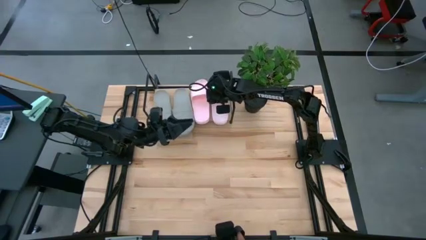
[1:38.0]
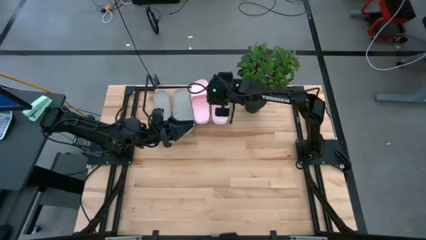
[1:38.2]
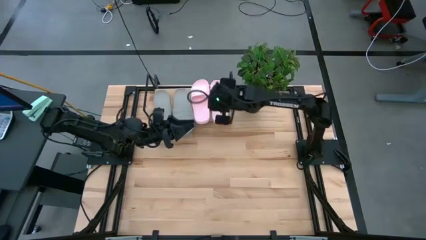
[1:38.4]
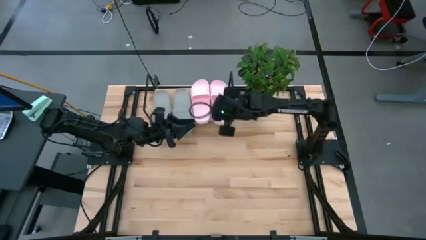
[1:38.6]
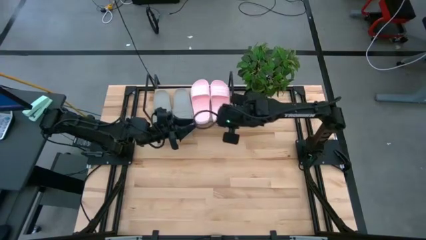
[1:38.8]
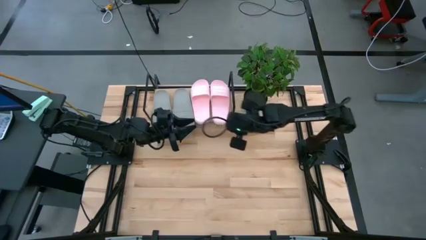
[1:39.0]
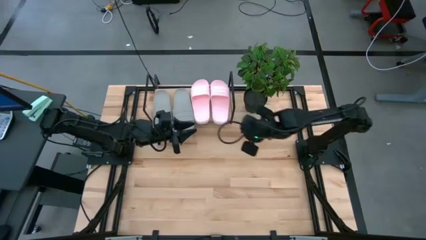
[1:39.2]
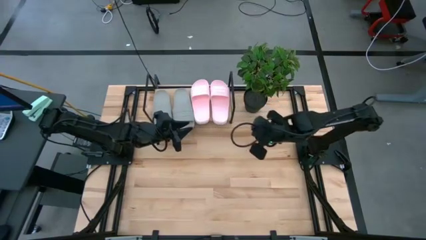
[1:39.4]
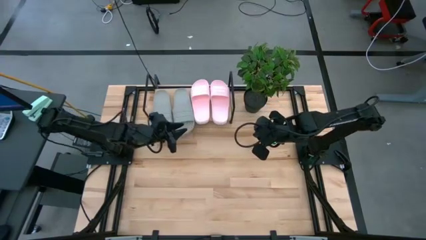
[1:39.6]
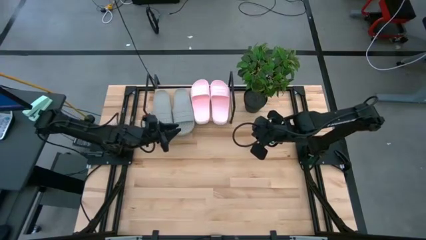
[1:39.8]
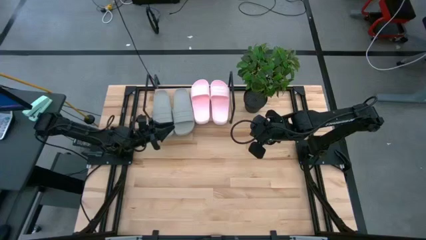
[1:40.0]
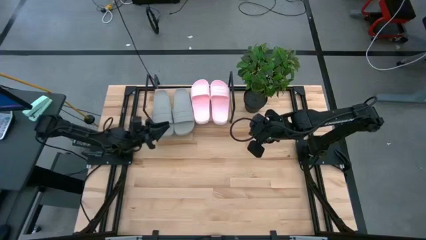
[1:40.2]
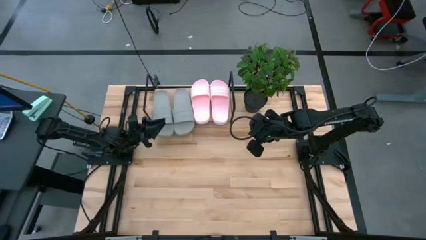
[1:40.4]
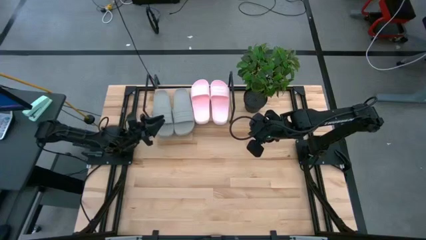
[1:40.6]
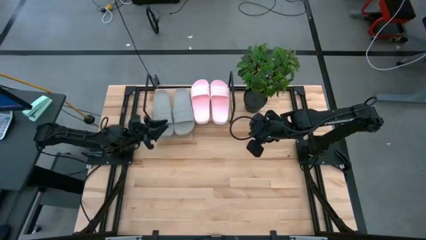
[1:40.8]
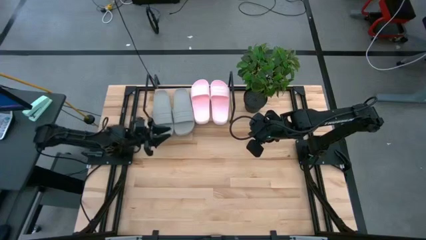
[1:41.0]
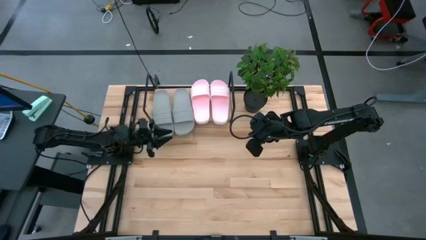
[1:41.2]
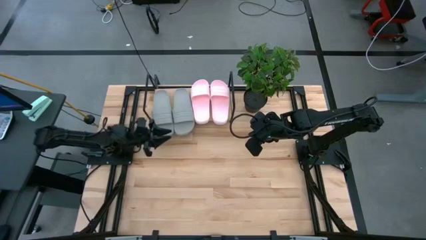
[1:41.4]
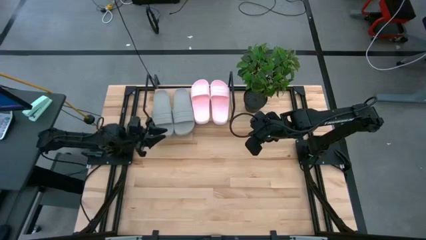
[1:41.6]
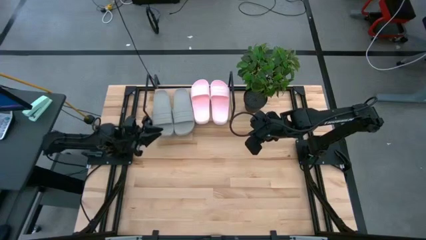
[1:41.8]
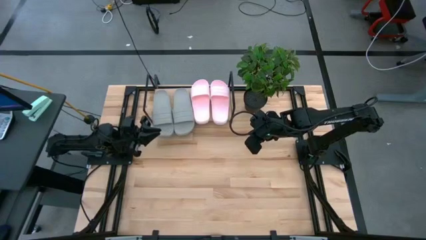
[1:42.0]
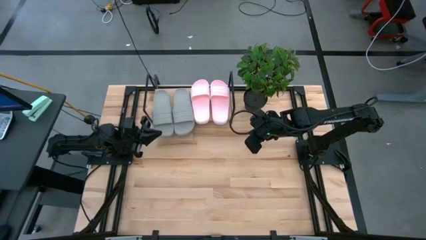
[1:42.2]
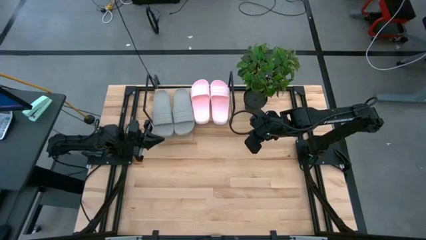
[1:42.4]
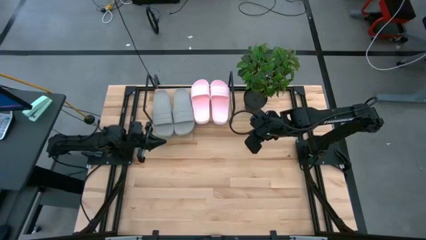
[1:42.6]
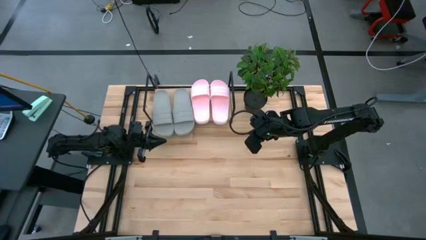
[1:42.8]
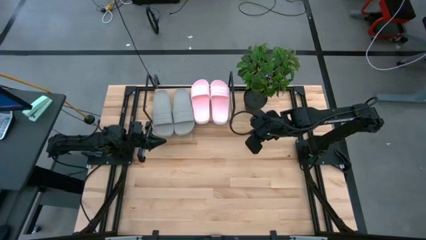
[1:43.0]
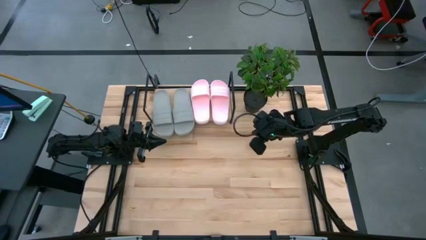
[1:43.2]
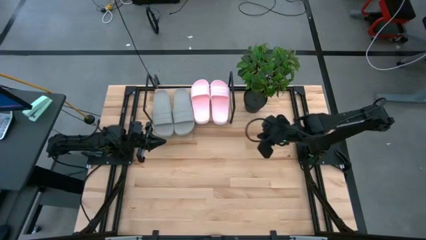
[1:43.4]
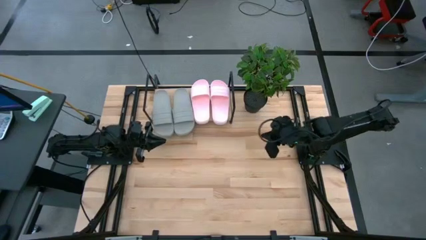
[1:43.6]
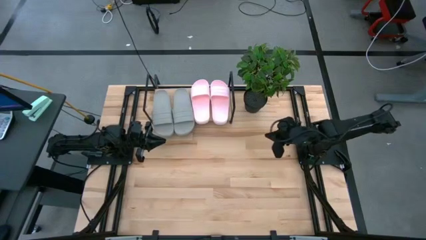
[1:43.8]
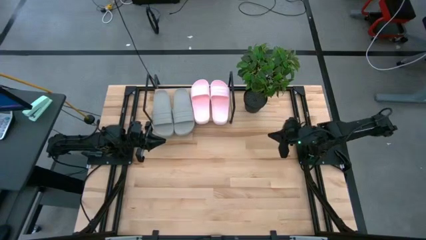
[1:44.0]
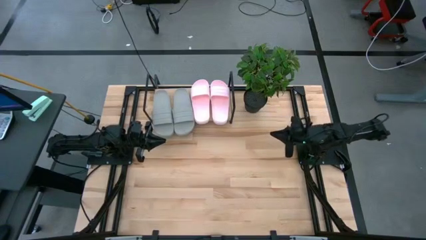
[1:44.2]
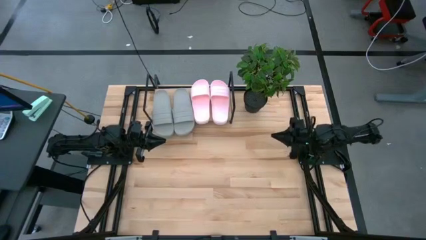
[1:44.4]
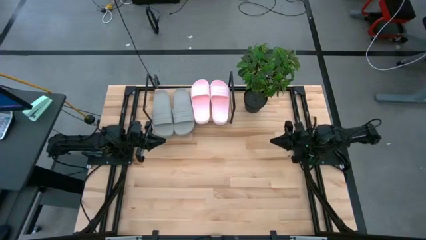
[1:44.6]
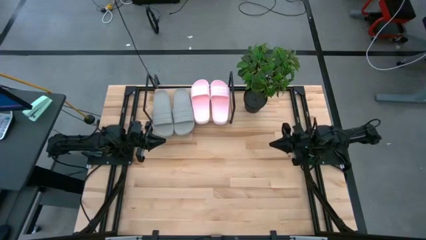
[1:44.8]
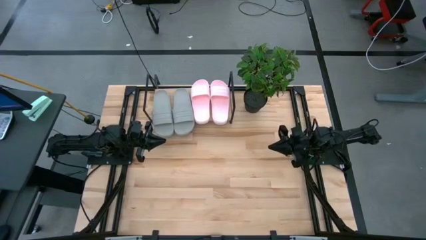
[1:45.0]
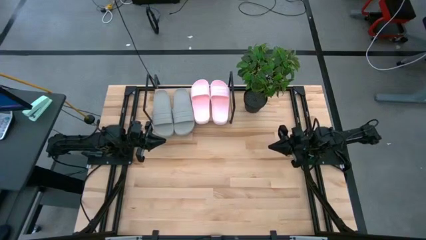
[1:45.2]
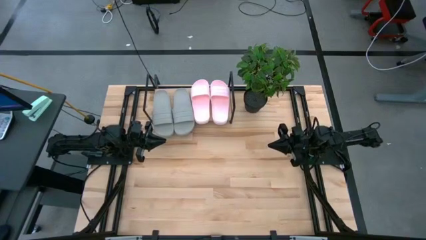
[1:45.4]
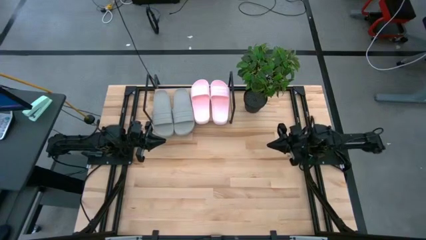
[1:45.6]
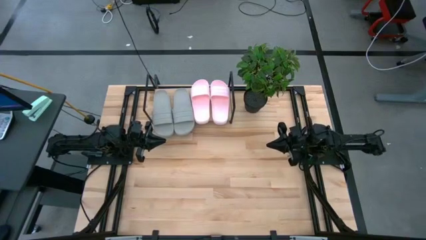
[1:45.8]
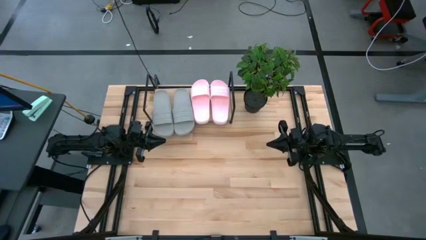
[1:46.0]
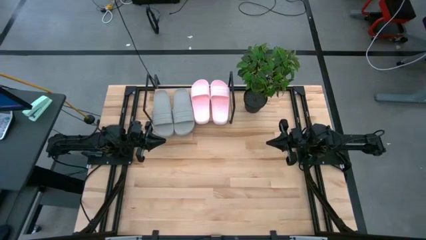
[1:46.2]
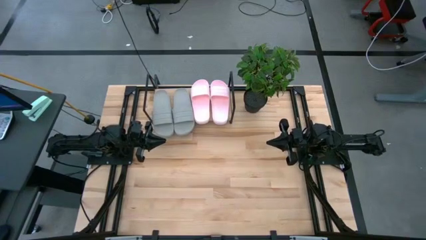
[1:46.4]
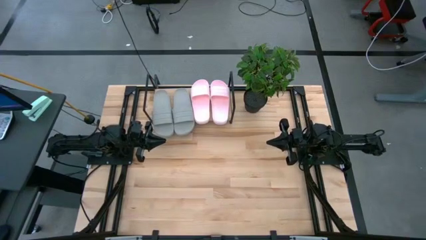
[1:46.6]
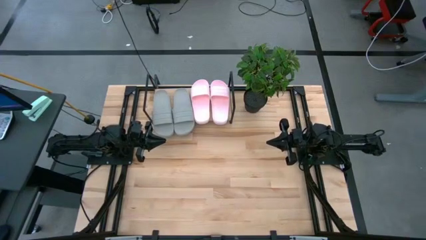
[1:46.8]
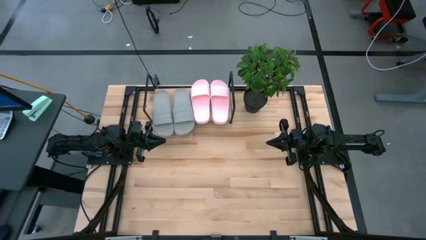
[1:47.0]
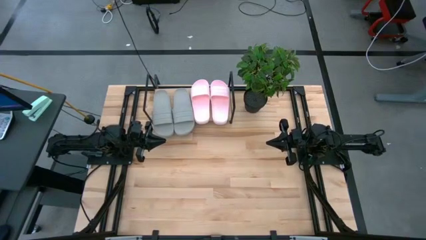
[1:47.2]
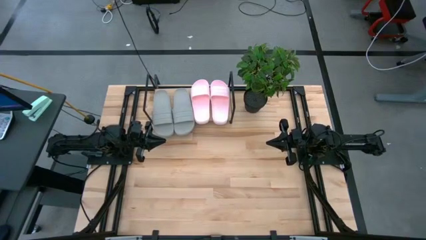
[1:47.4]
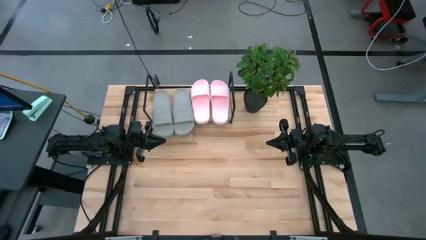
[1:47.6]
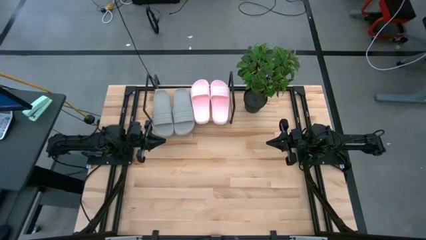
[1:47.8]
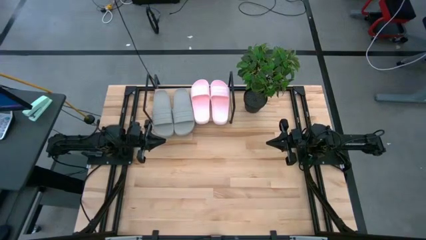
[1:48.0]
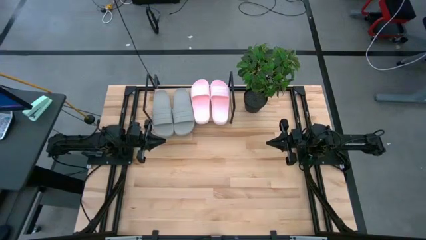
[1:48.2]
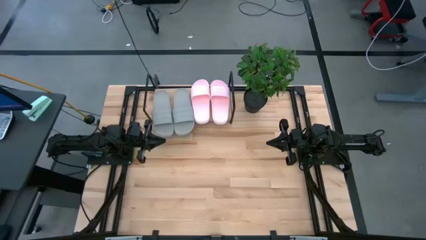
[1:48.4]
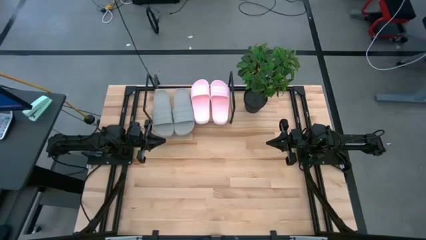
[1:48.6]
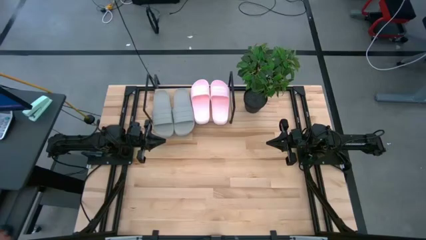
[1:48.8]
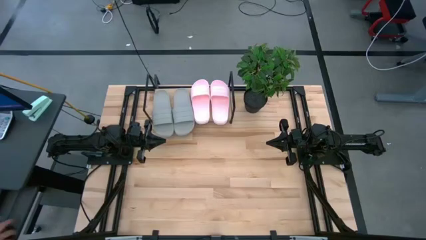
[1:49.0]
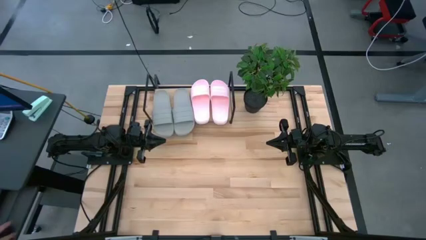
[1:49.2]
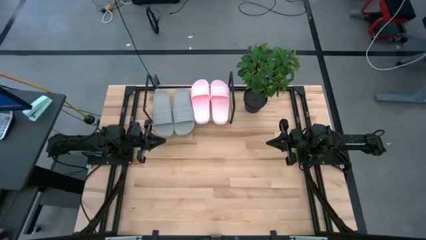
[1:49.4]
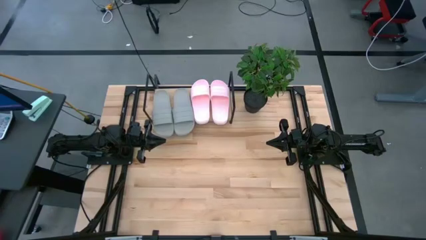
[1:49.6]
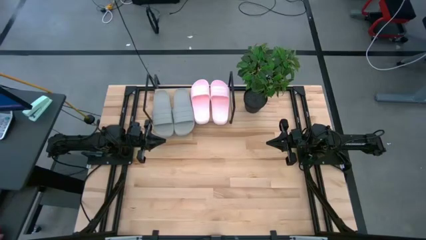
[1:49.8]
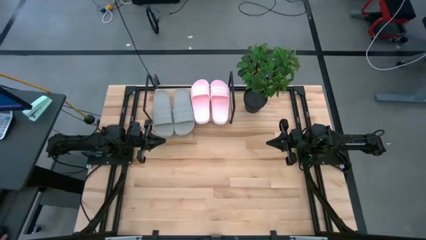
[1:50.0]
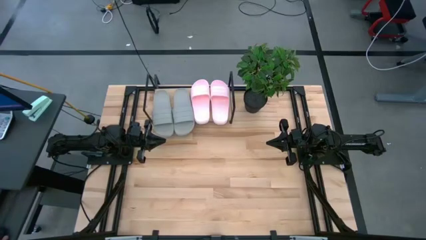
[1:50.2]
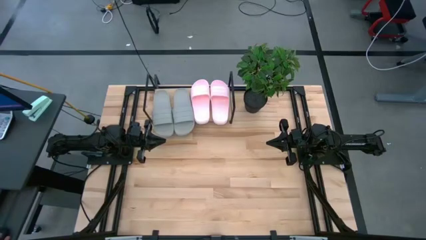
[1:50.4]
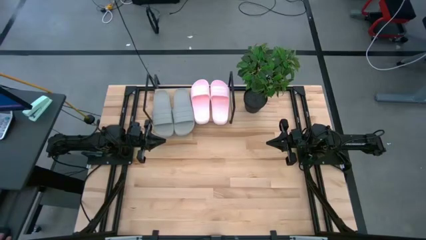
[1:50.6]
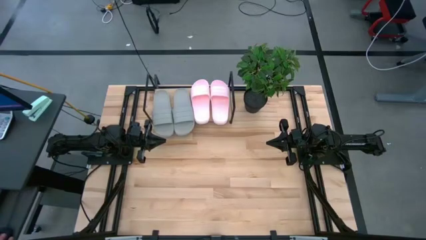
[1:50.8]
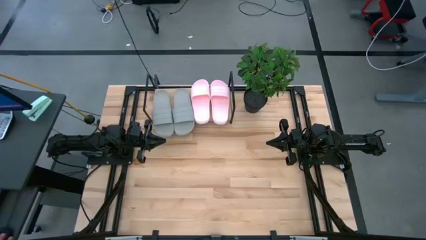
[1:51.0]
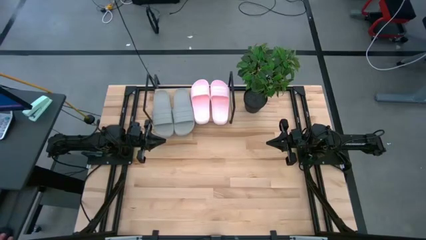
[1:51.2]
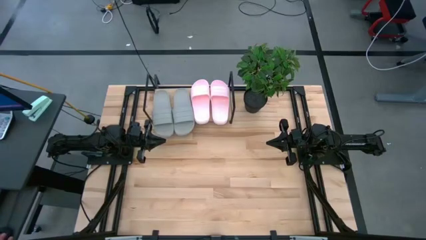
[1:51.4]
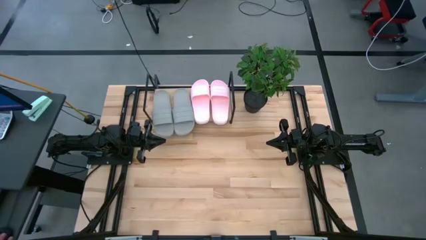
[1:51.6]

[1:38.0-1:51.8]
Task: Pick and place slides into the shelf
Return to Home Position

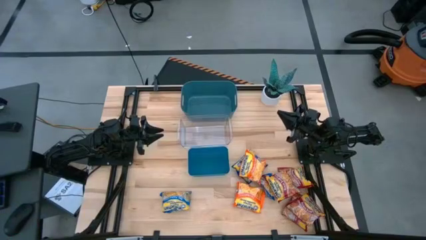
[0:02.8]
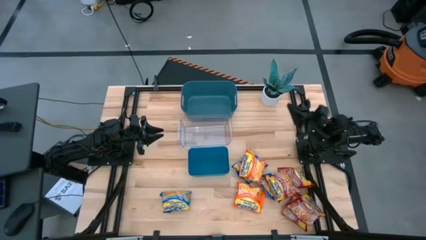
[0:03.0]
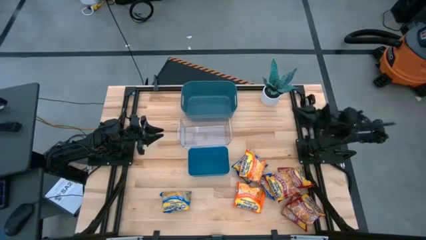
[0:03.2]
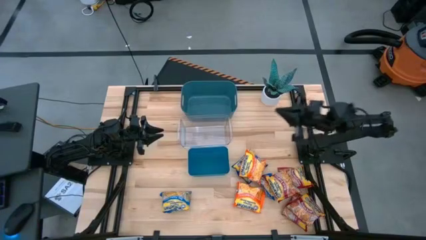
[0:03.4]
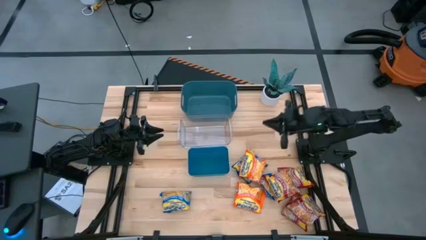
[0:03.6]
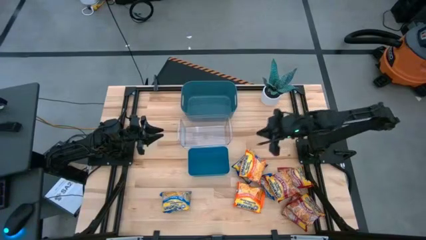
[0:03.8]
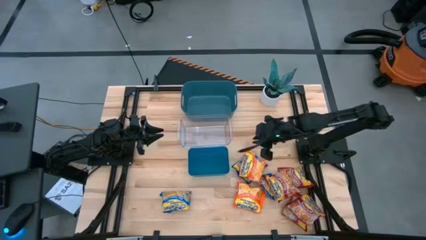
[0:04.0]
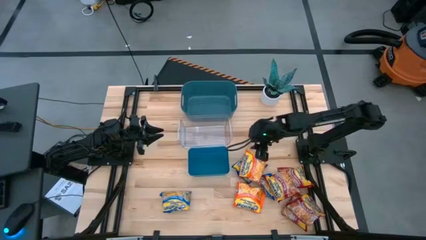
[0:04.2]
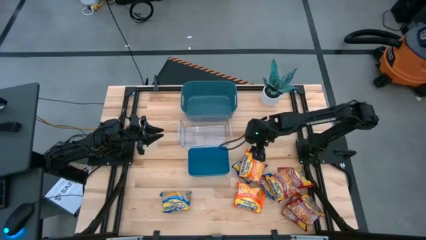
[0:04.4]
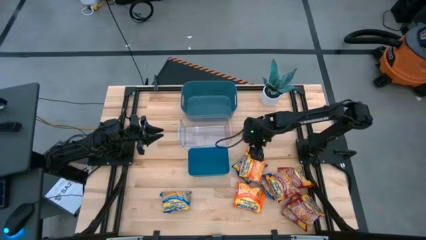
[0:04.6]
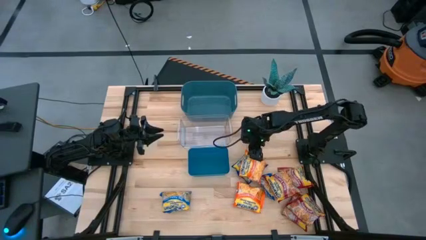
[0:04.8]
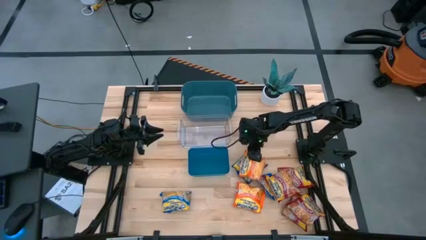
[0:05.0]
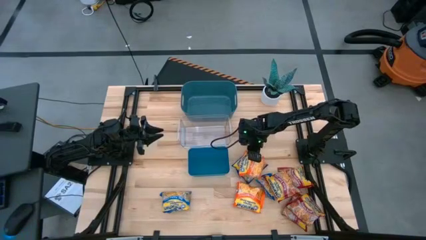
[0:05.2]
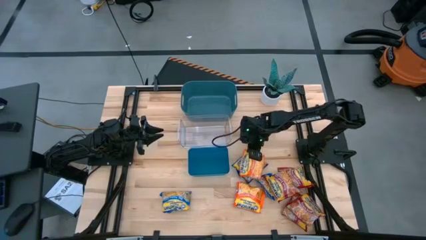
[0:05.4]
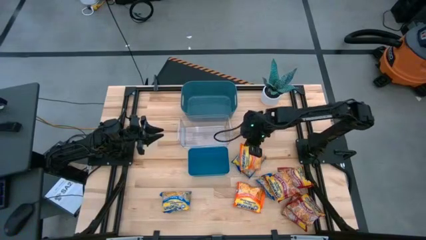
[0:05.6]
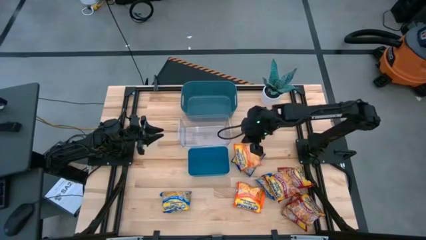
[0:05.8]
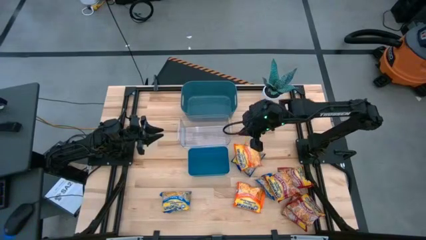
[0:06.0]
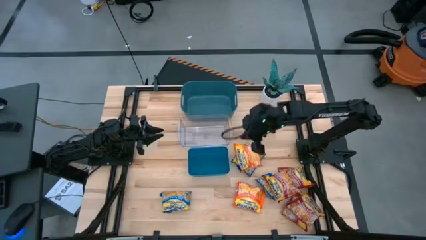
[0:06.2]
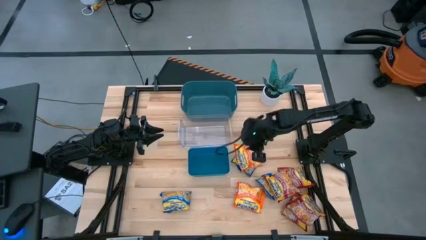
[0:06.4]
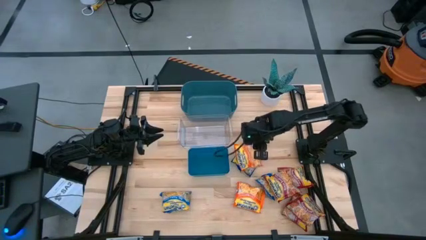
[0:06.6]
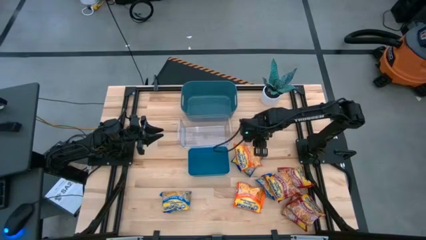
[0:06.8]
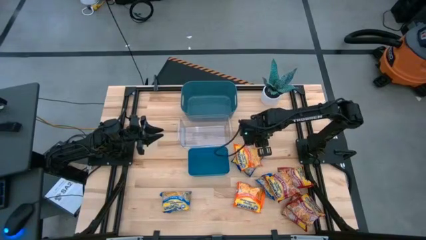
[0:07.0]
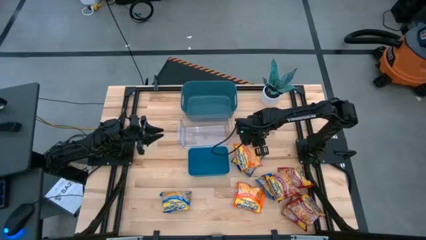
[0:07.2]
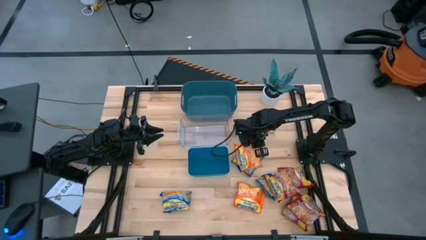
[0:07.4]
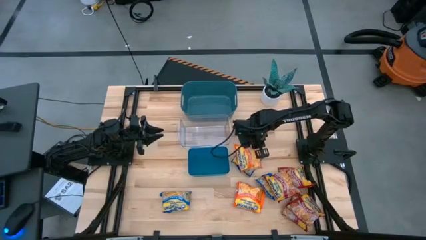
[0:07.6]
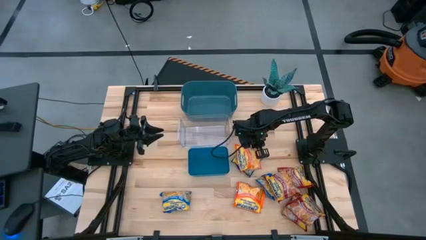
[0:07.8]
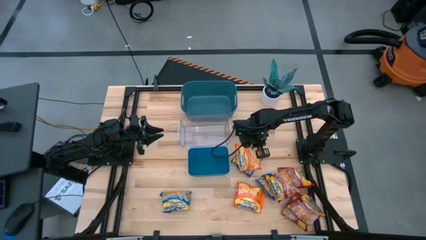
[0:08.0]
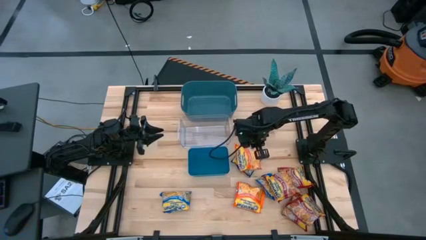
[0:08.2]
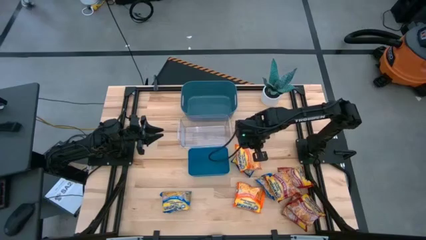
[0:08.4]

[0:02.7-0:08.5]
Task: Sort Maruchan noodles
Put the top orange noodle pack into the bottom blue bin
